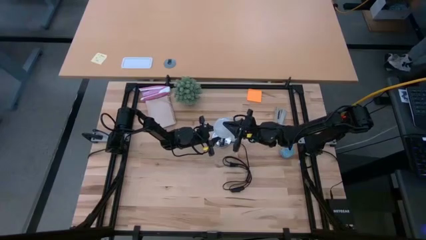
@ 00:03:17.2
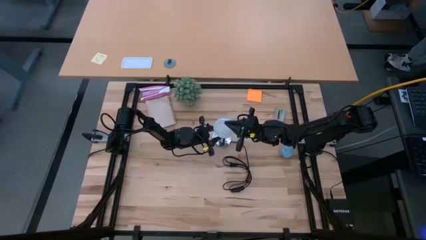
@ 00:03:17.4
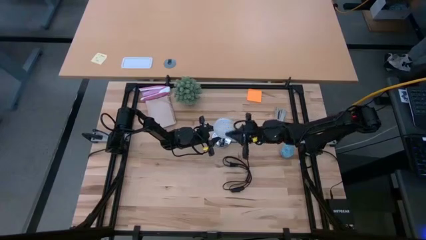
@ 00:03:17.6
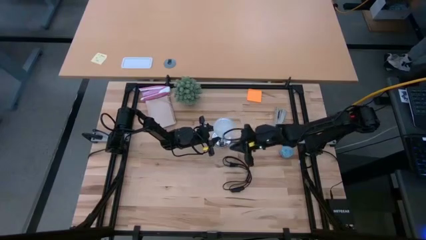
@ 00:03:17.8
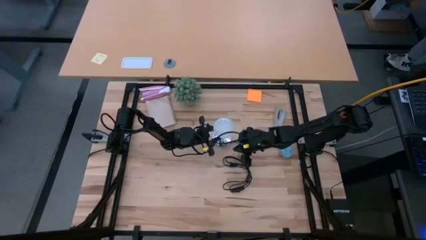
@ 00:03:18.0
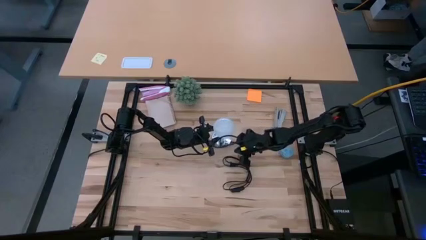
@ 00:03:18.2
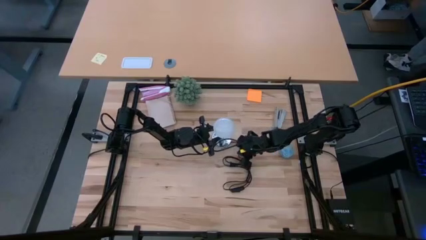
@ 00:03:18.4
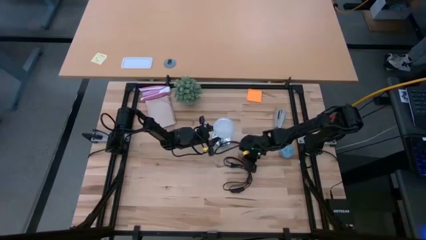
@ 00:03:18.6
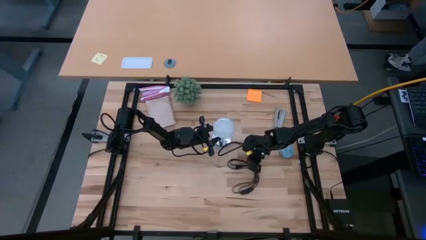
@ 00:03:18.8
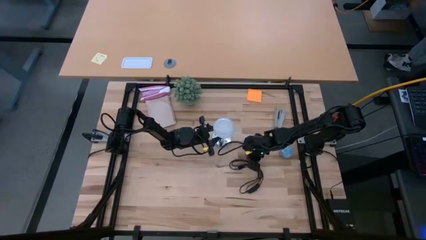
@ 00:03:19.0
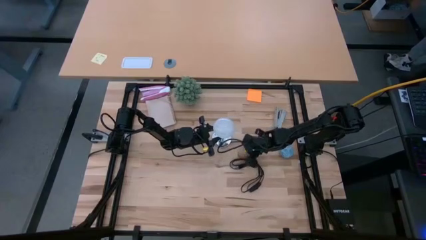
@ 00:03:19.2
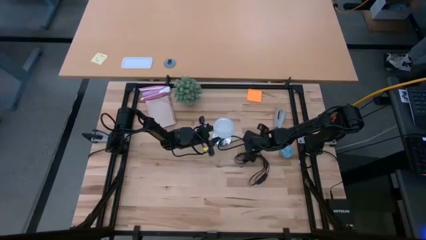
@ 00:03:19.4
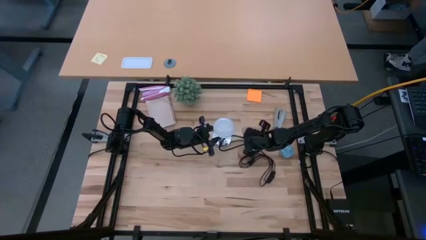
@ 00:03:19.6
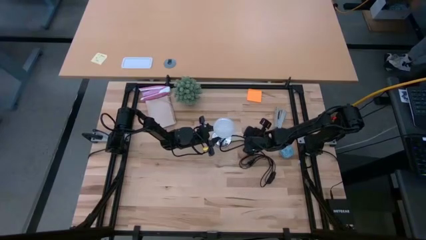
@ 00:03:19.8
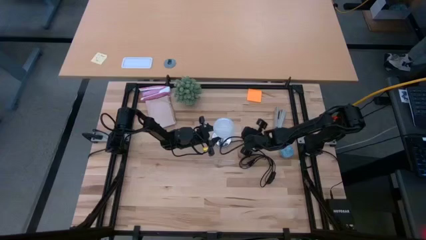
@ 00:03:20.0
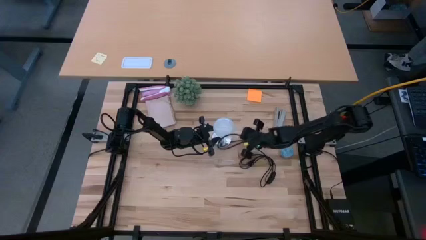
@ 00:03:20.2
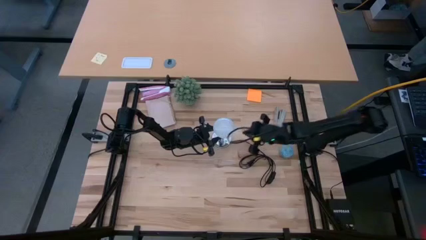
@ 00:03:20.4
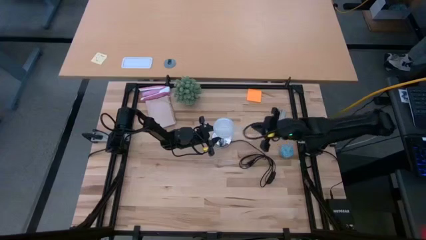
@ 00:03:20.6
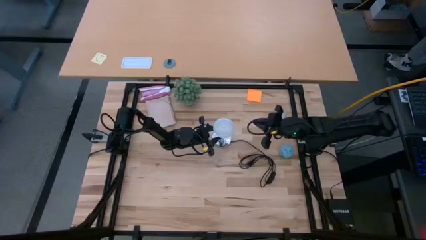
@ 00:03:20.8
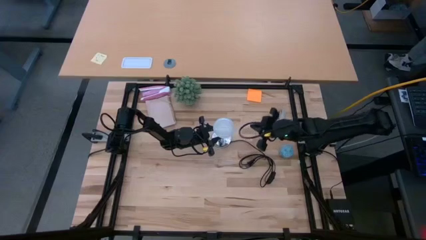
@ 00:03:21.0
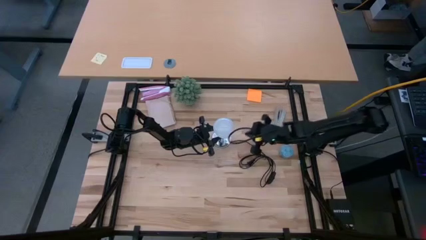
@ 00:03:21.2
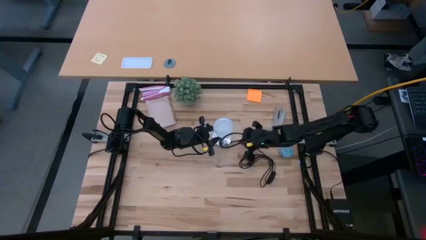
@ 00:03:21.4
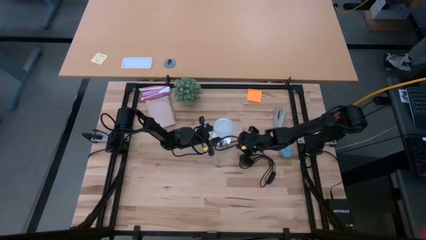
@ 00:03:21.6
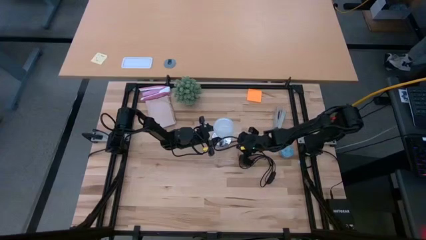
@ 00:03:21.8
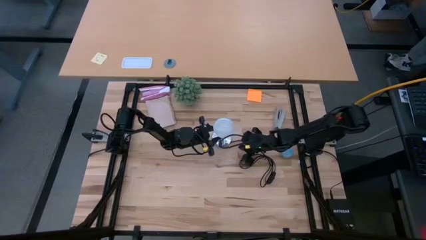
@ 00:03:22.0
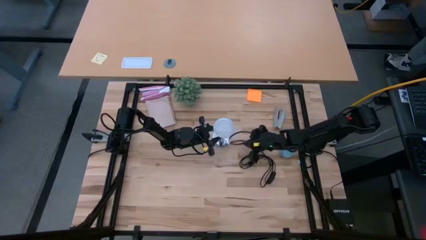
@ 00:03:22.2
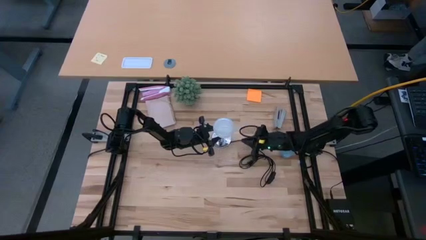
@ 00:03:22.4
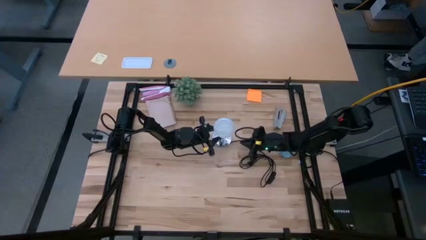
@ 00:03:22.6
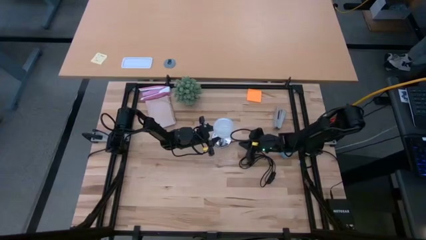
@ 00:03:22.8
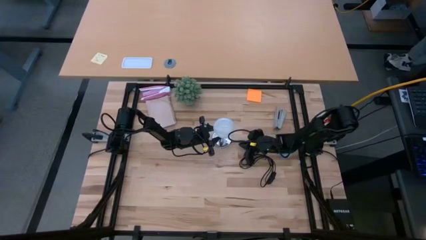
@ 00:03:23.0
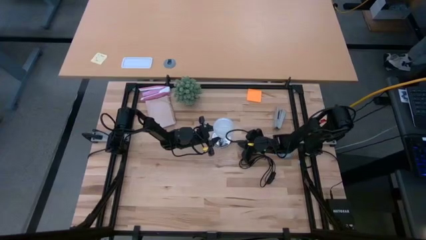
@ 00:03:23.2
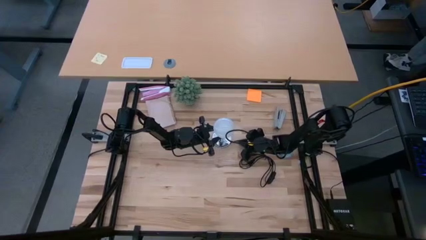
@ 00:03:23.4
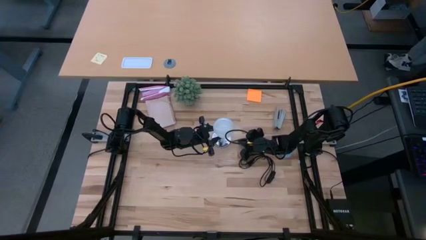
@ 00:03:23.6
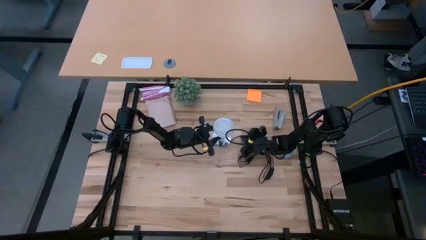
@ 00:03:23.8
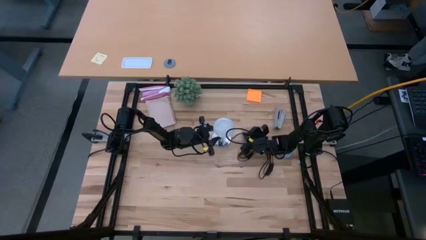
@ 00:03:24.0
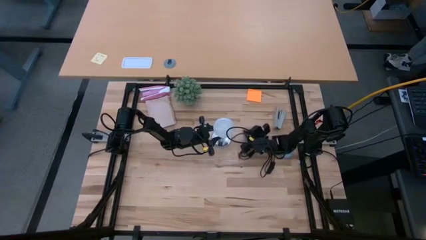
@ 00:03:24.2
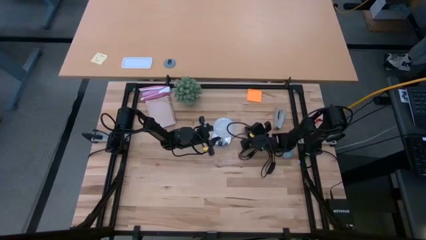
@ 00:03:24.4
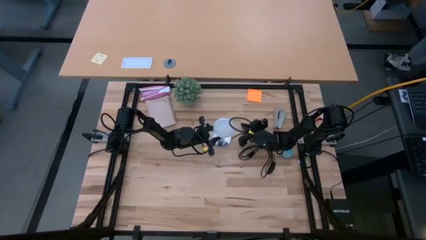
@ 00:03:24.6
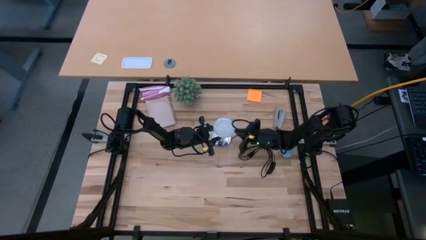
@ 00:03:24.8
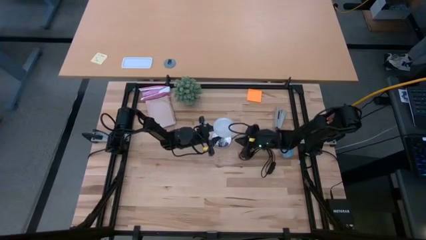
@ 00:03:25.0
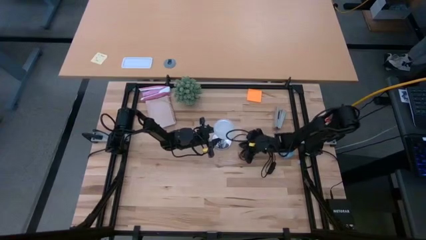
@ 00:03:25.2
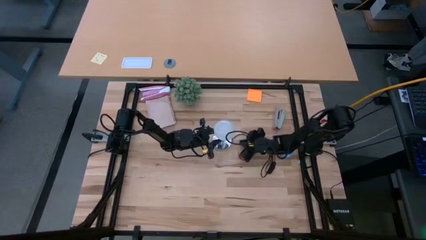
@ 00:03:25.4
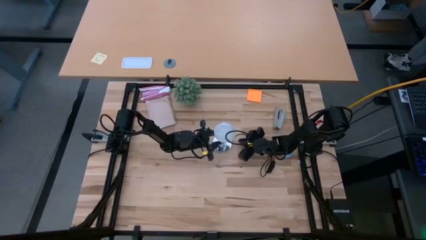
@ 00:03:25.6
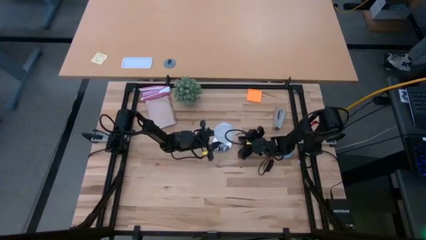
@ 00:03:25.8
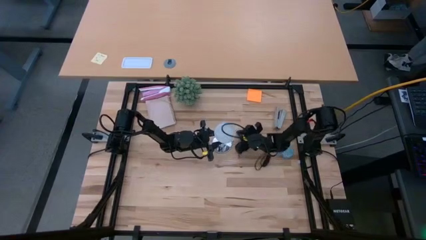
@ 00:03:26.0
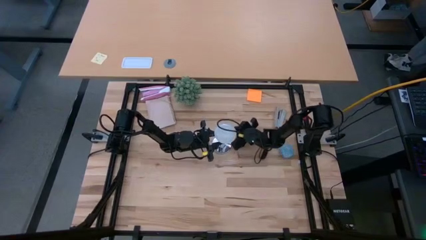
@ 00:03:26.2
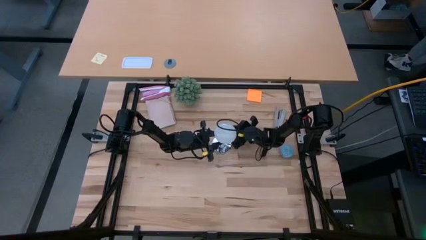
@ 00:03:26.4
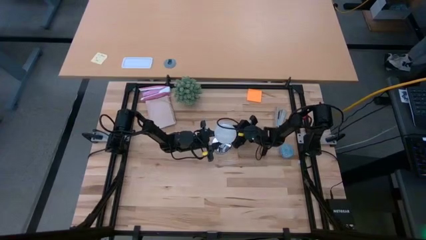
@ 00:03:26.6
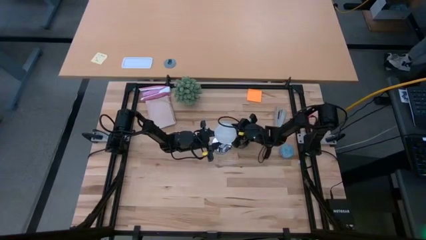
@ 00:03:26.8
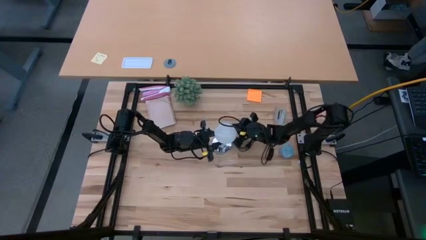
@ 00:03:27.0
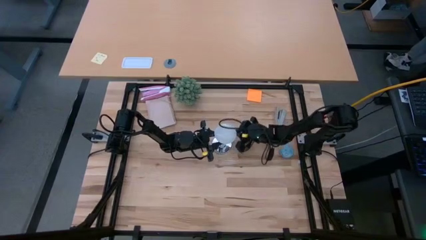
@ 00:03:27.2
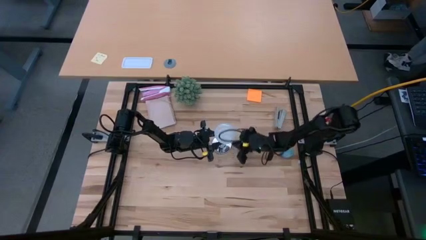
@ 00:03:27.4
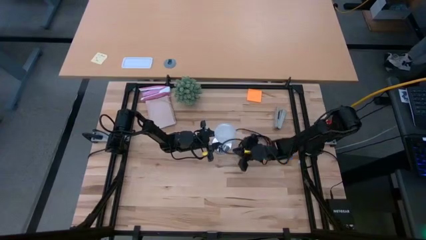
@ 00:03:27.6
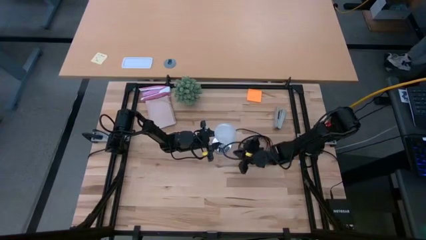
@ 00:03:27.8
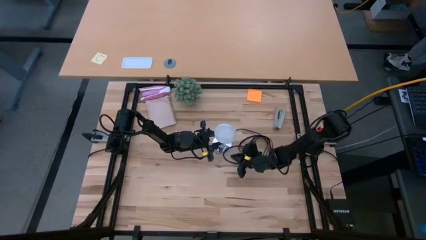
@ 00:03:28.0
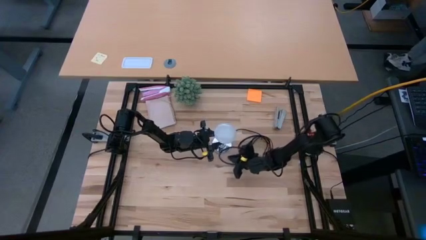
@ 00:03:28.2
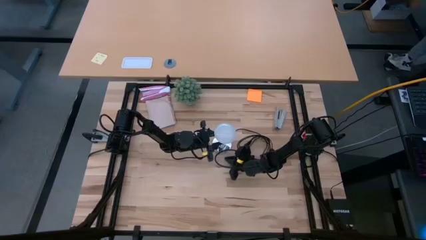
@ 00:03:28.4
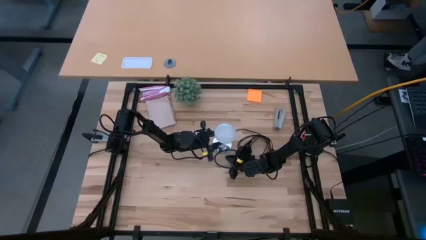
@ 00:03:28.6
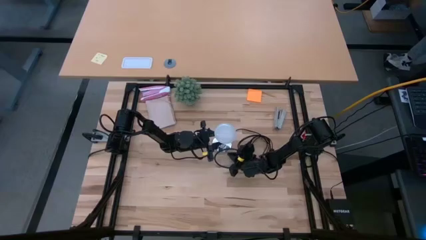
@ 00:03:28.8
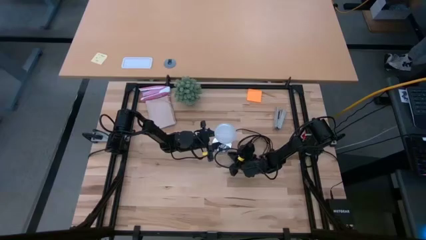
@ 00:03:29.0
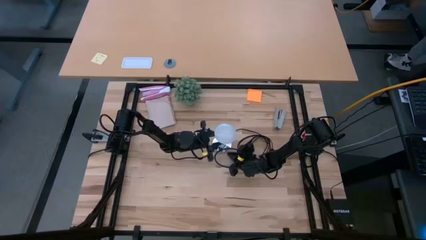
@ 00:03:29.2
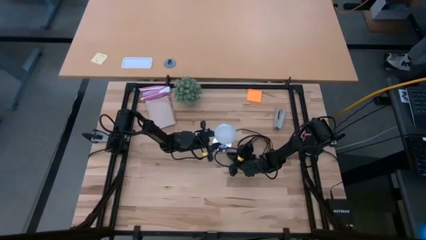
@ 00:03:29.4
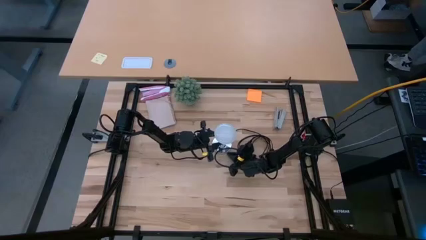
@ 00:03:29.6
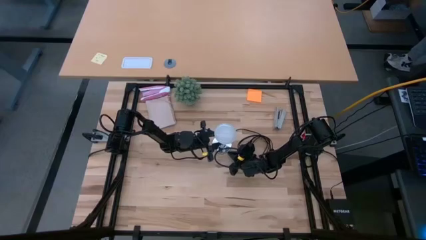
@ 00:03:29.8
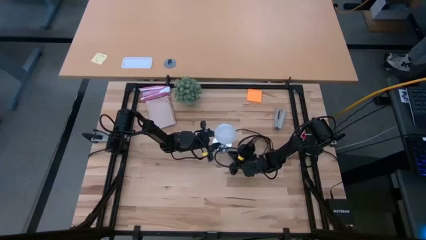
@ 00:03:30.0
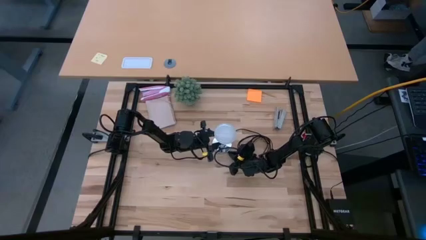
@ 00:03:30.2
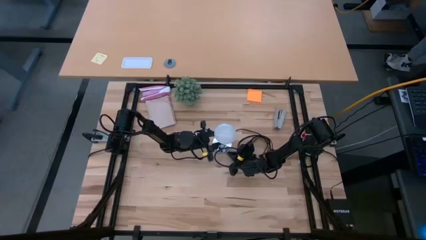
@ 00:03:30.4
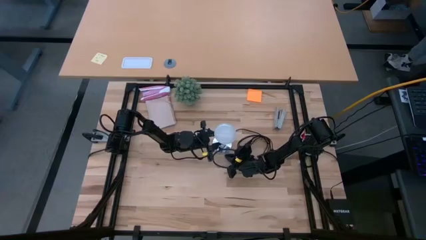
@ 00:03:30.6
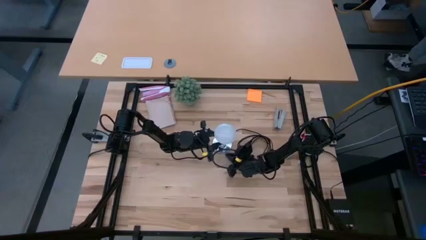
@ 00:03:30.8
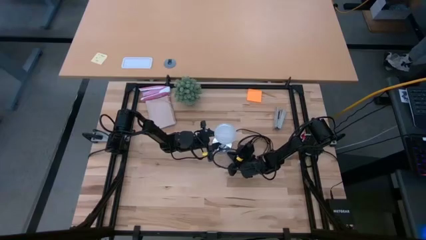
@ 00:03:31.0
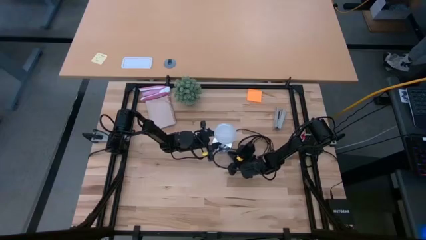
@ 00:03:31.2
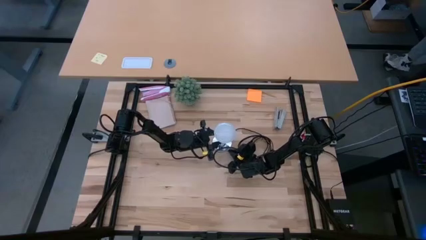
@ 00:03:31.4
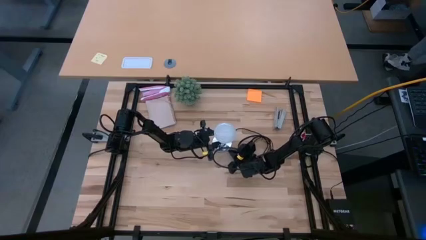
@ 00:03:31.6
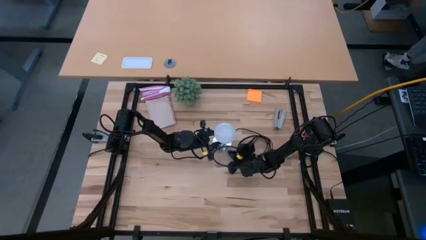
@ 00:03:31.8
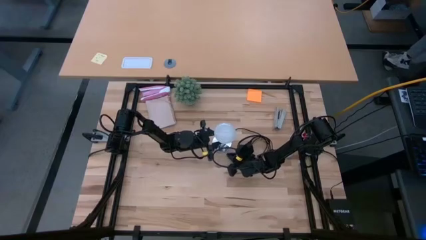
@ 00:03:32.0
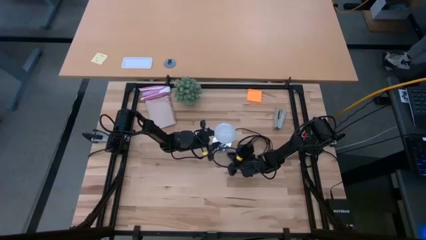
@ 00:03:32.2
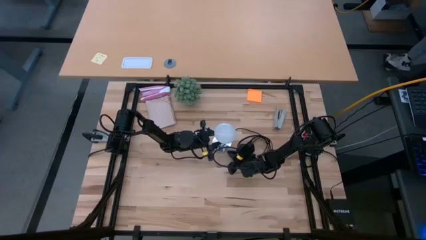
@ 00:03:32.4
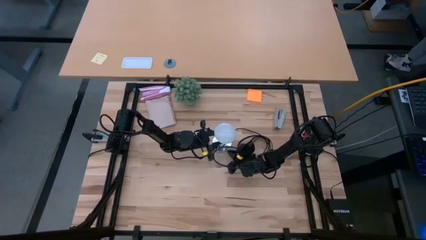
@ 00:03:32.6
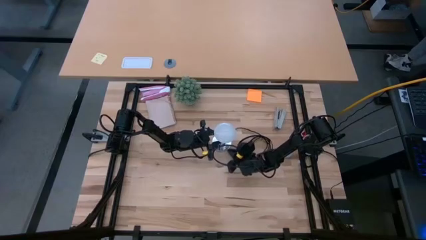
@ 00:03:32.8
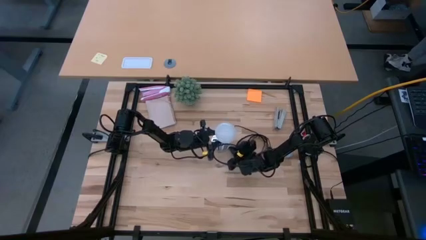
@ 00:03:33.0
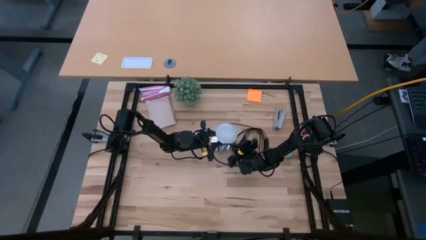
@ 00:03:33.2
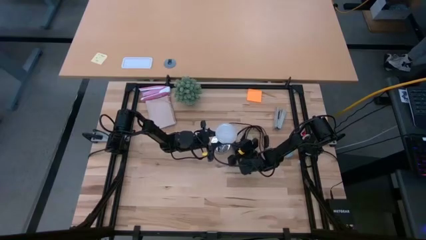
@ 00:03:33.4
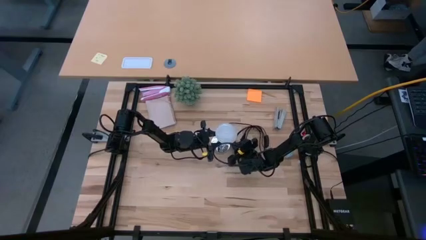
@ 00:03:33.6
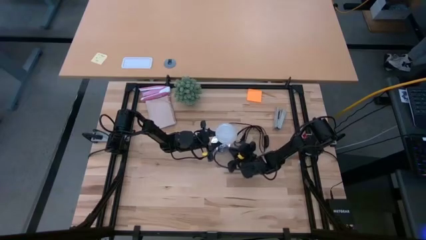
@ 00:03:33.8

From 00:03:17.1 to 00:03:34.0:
Task: Screw lightbulb
Insert the lightbulb into the lamp
